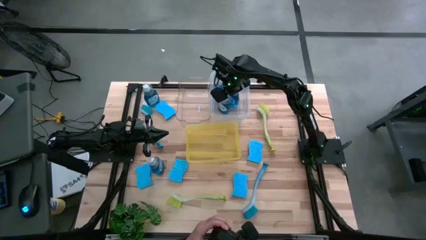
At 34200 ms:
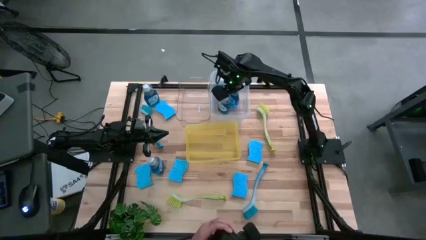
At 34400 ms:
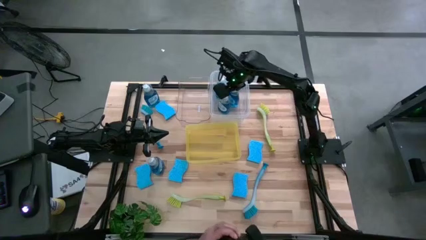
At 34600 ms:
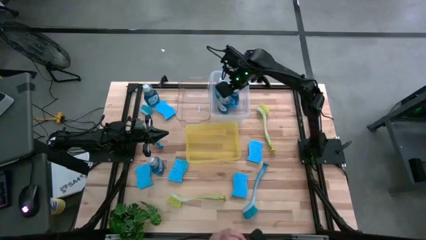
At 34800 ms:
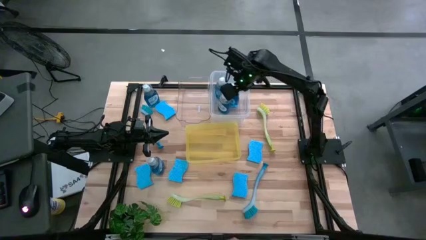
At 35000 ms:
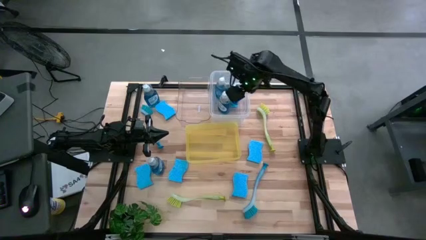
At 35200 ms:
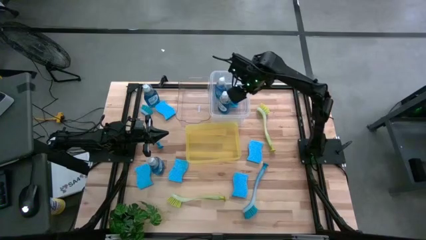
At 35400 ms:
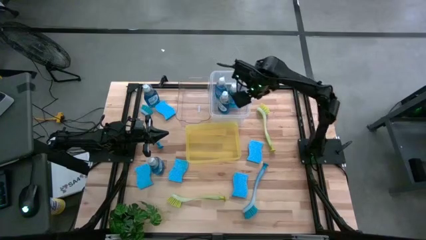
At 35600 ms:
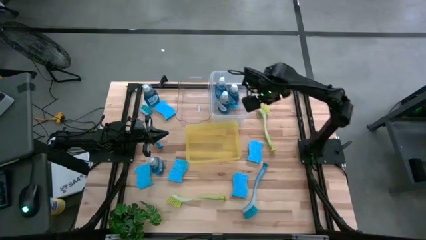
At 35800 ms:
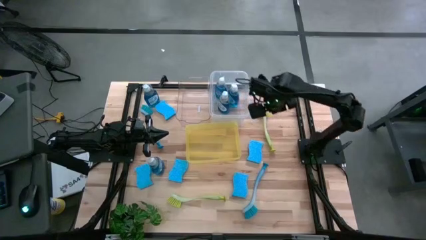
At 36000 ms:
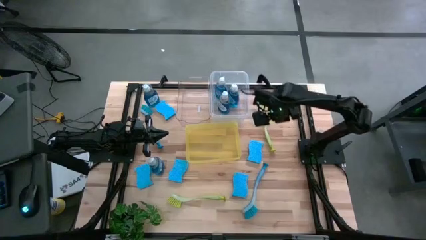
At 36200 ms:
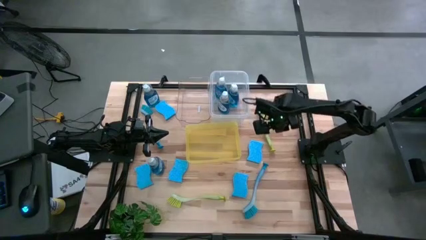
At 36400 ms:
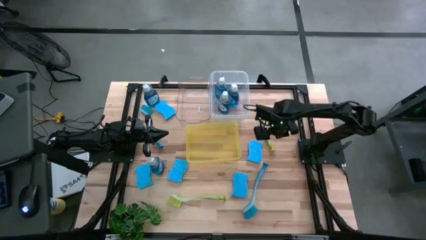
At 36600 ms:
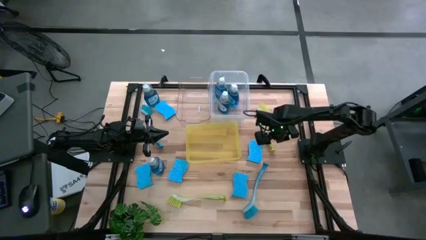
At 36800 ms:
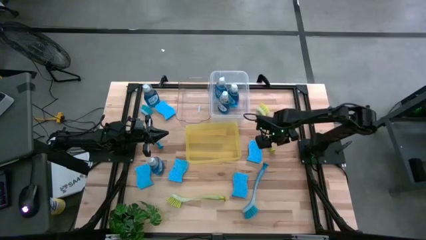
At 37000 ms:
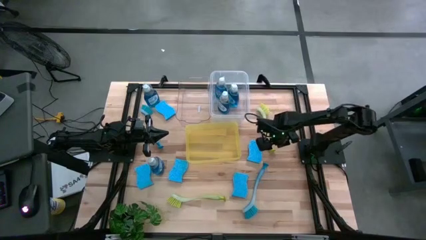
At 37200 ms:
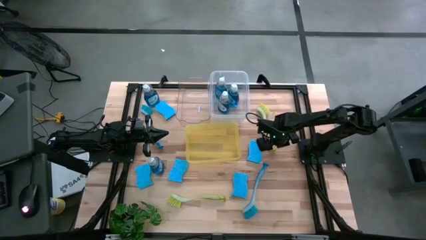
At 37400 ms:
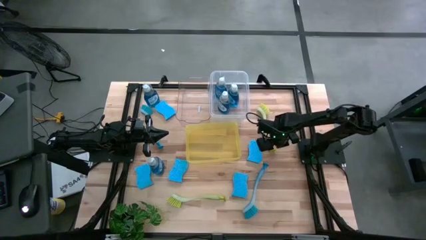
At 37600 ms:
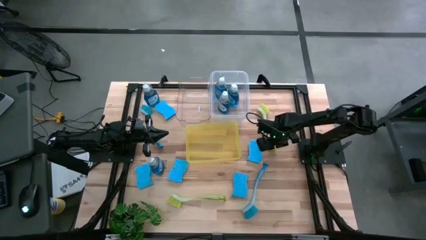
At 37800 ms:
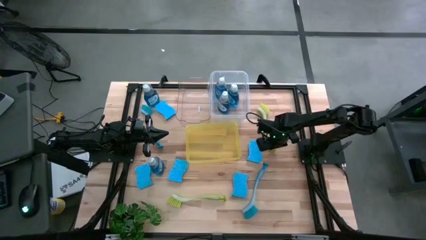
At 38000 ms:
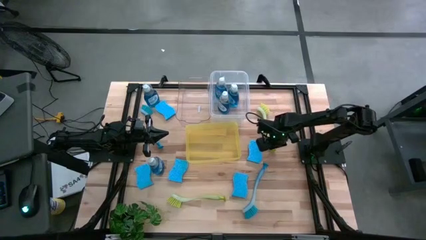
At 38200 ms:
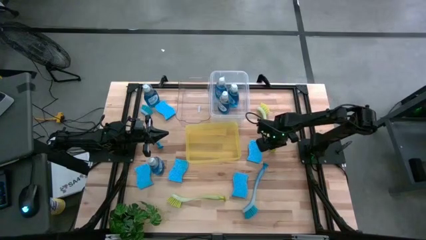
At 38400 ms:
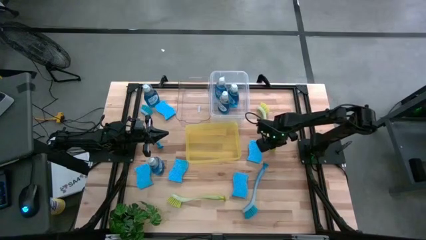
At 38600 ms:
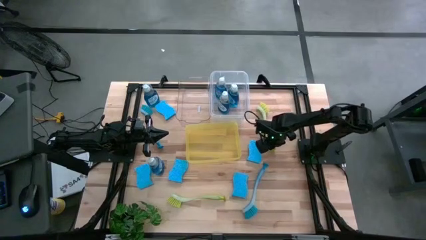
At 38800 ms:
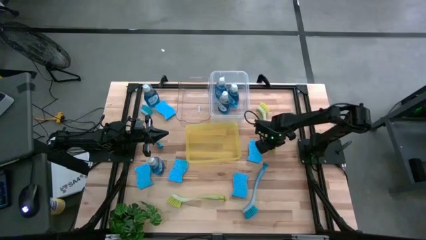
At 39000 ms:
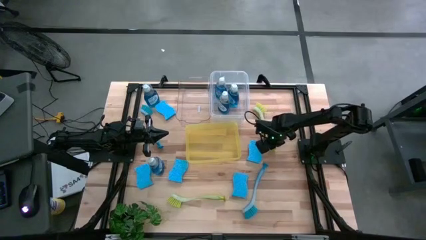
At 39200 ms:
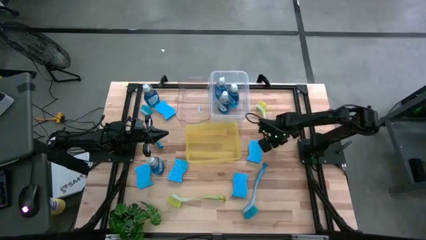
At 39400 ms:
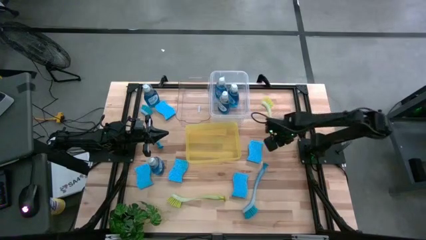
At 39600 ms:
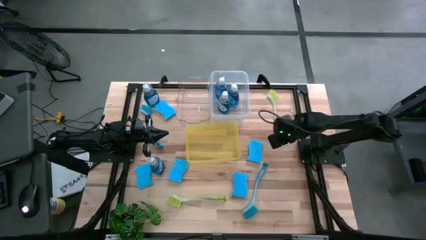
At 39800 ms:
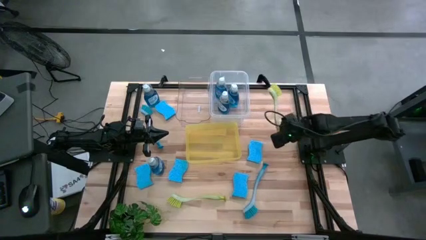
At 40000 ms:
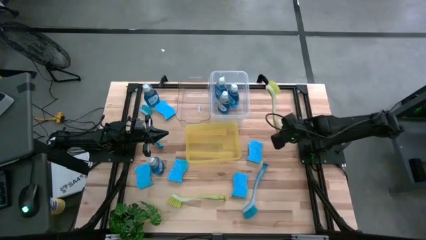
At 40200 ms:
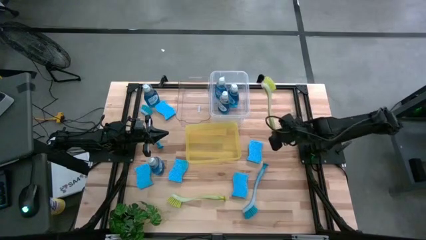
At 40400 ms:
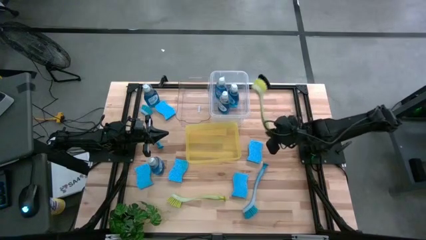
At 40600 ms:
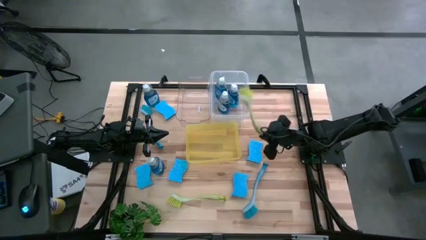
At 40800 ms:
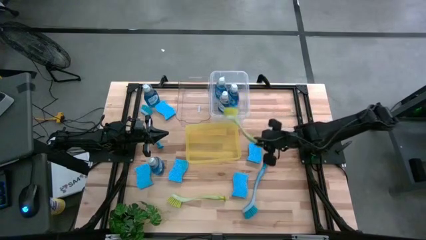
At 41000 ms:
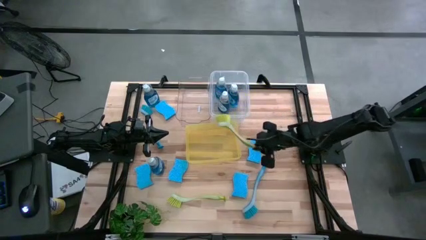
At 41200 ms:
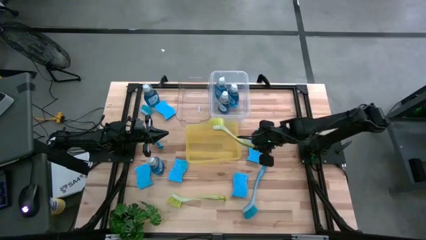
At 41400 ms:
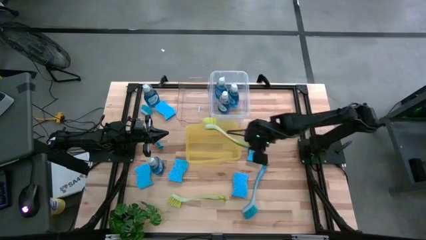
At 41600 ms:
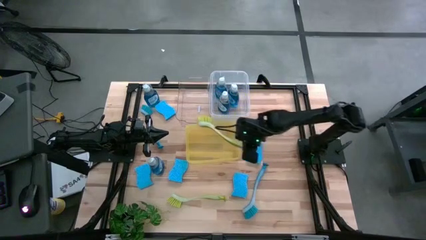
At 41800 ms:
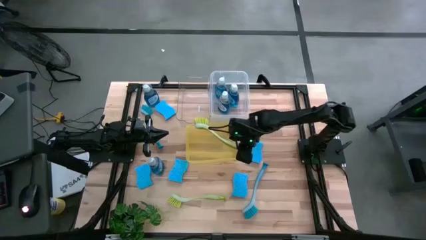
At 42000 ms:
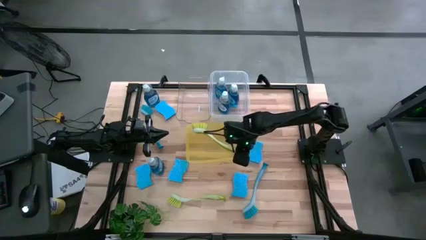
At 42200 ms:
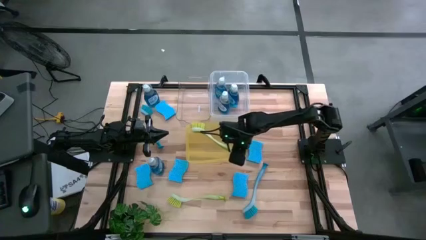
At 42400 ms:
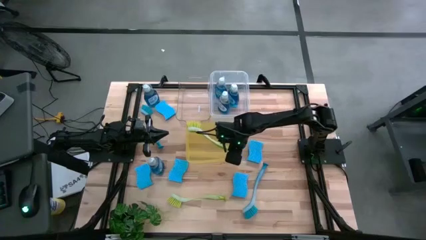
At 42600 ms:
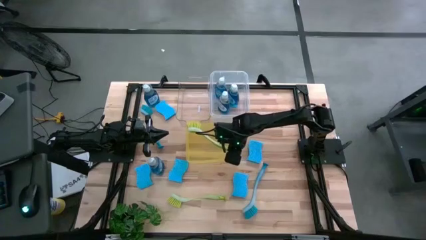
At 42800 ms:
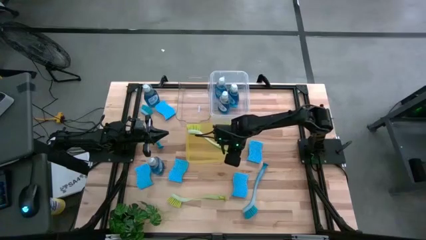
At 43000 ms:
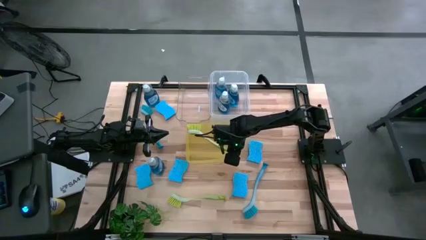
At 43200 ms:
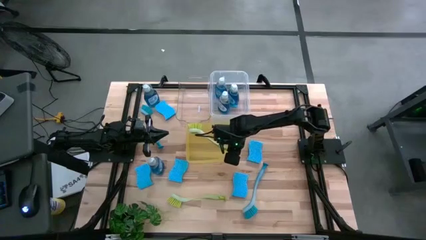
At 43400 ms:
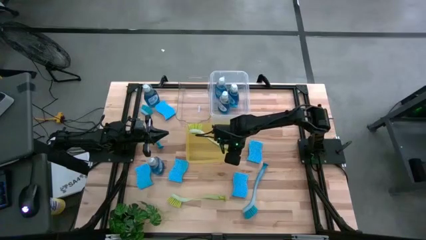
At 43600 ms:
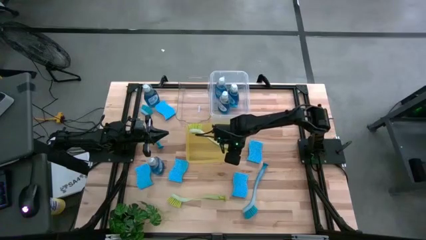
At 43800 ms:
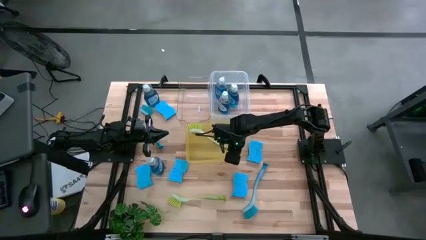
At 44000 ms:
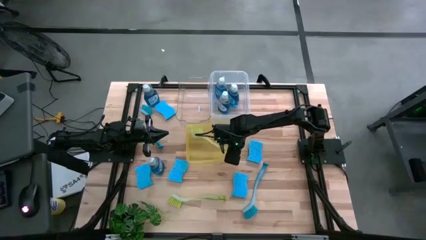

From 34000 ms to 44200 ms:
Task: Pick & Place Kitchen Sink Supplies
Put the yellow toilet brush into the yellow bin

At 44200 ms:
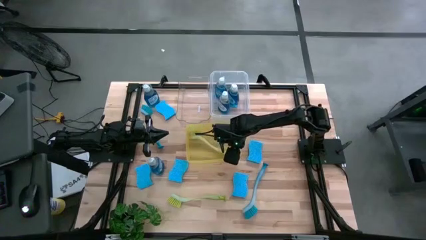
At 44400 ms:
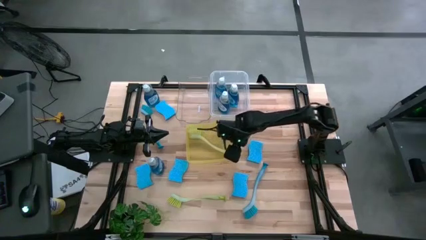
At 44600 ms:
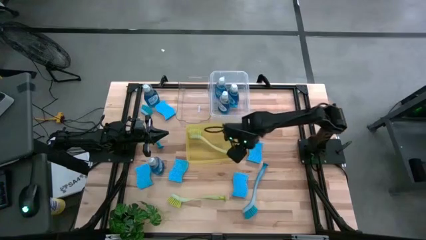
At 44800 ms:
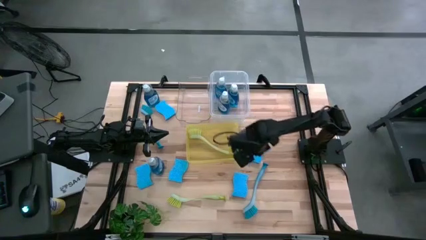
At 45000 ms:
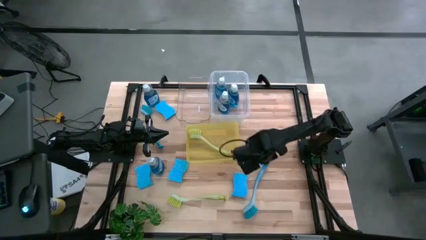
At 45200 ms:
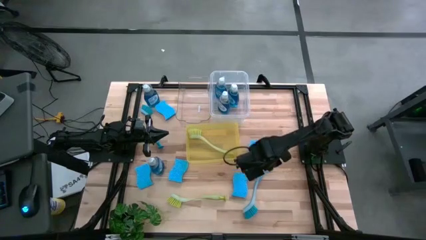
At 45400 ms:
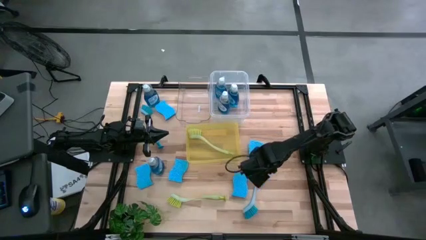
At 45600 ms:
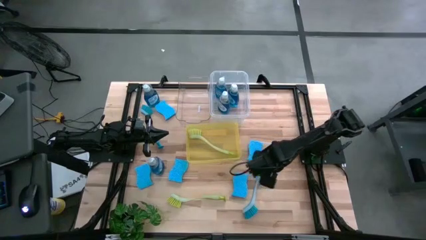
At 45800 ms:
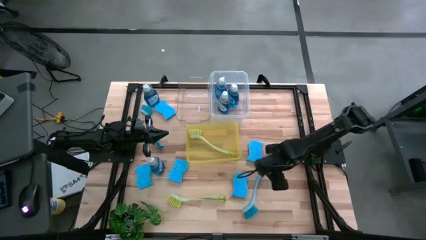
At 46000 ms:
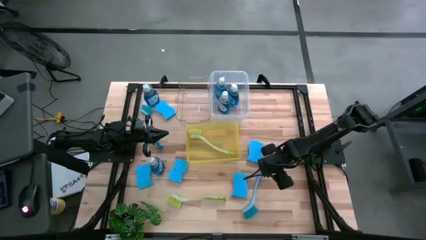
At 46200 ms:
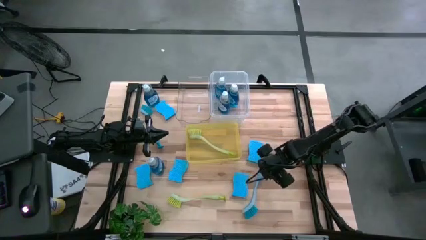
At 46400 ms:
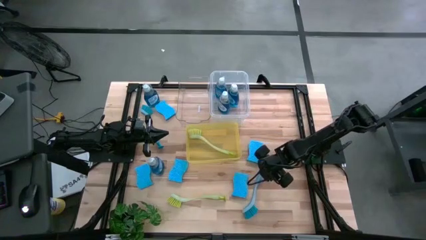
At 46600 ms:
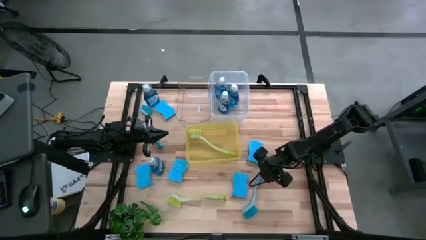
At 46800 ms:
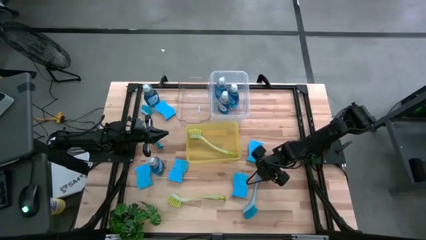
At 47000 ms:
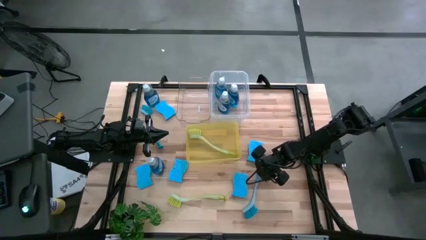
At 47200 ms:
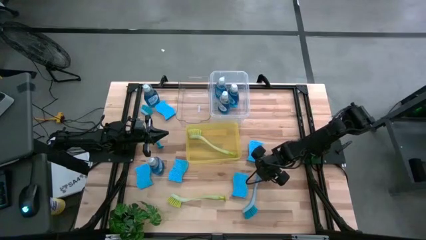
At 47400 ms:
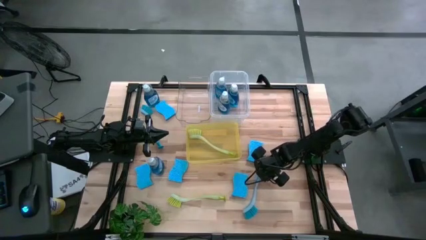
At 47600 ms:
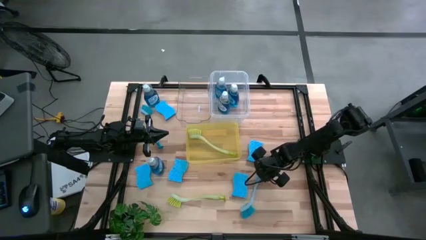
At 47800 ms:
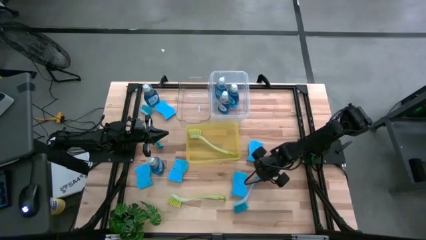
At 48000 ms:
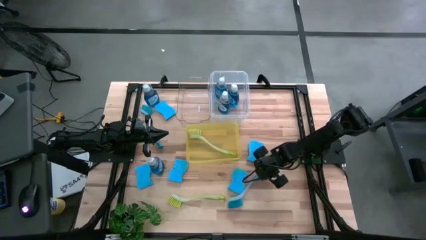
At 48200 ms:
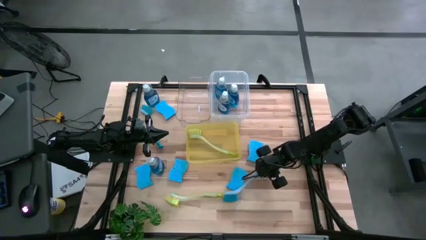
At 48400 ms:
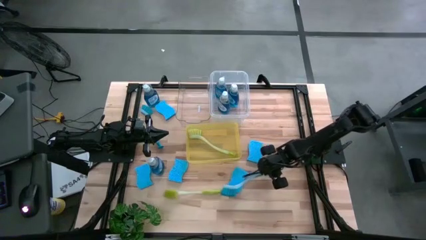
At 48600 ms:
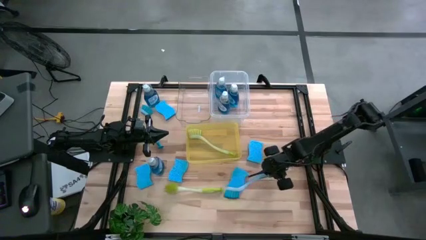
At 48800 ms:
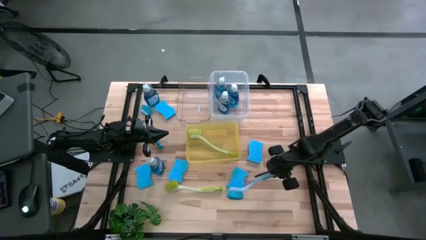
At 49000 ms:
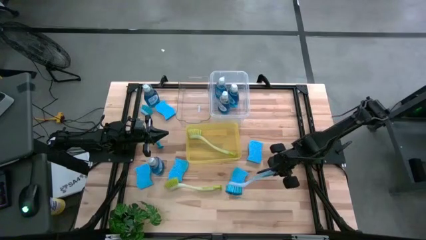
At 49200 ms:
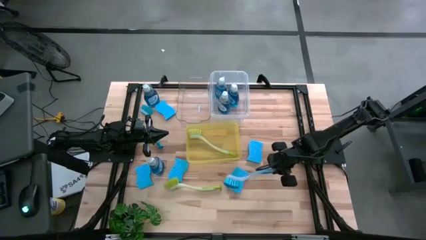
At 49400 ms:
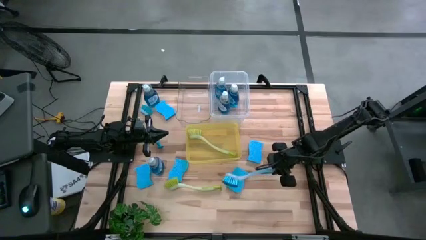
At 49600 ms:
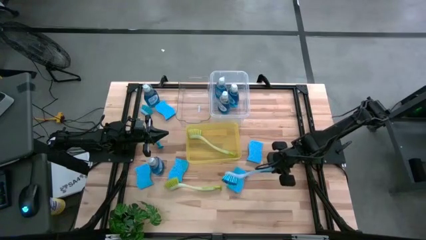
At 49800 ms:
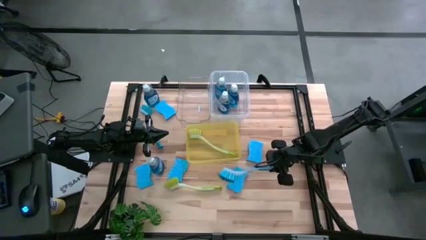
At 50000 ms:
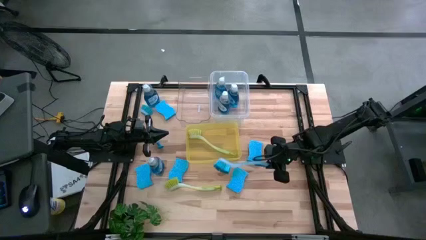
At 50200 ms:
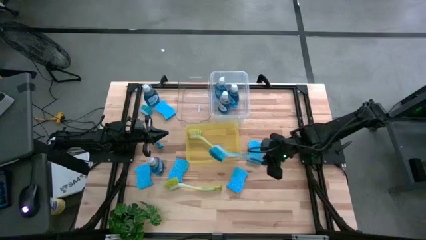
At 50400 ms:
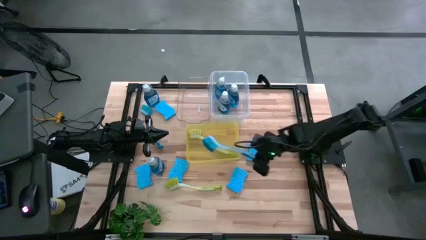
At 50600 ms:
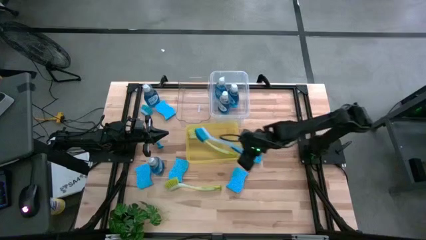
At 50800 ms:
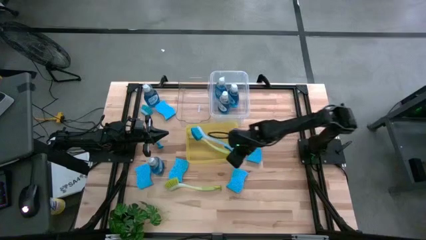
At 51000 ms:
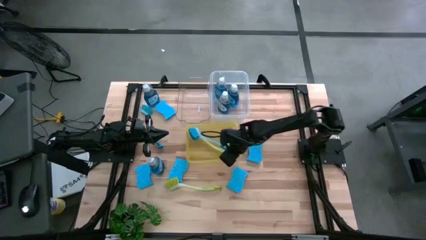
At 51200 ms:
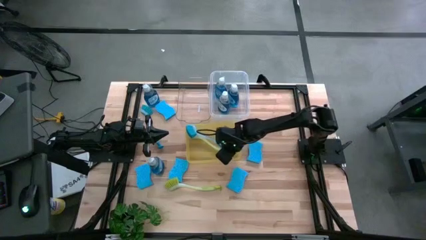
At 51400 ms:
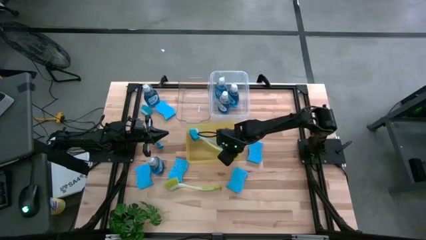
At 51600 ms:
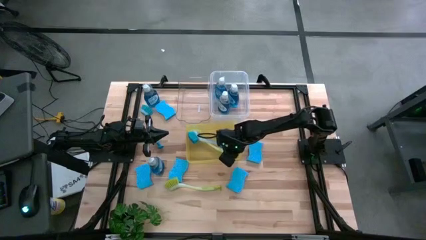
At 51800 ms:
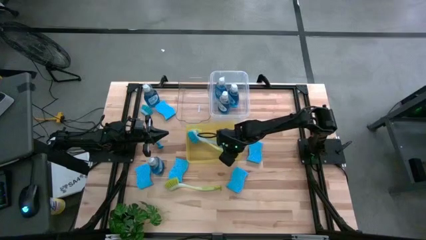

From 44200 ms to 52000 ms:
Put the blue toilet brush into the yellow bin
